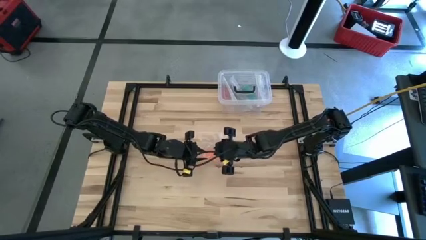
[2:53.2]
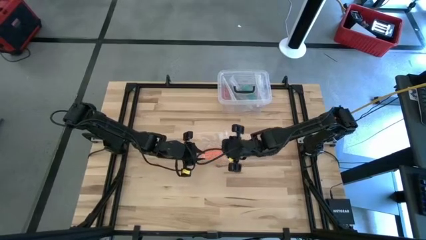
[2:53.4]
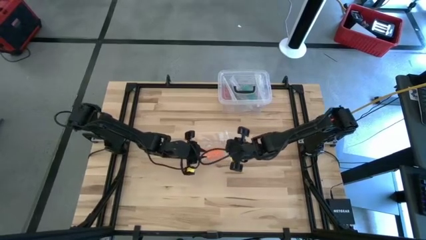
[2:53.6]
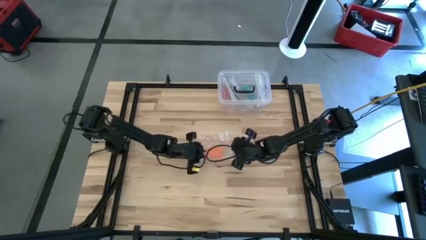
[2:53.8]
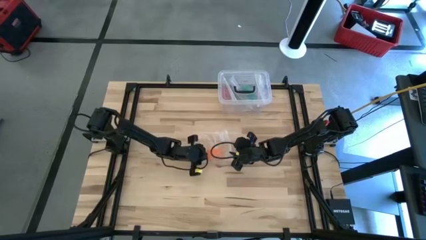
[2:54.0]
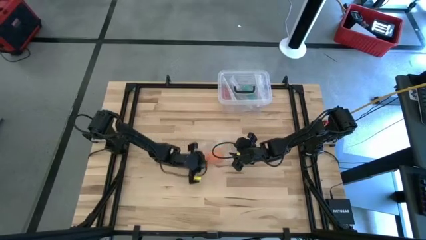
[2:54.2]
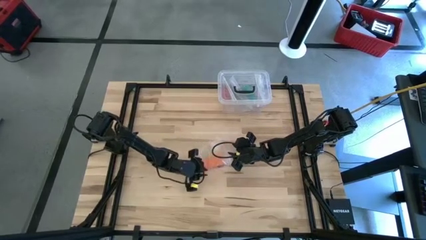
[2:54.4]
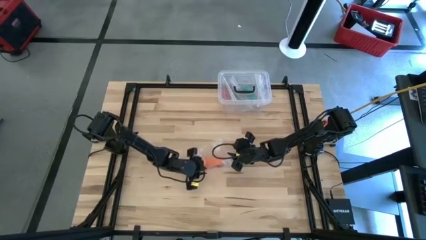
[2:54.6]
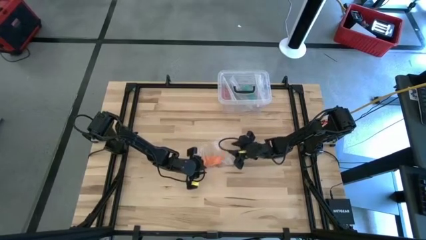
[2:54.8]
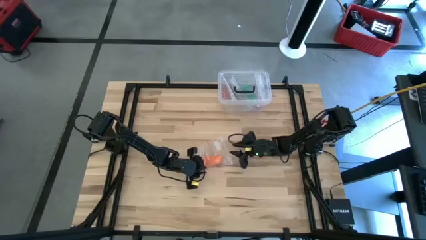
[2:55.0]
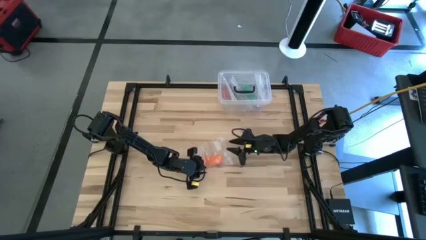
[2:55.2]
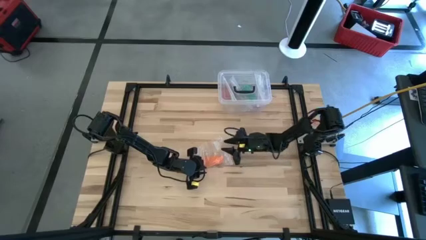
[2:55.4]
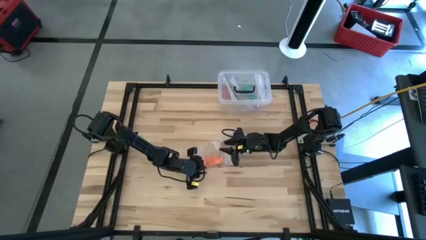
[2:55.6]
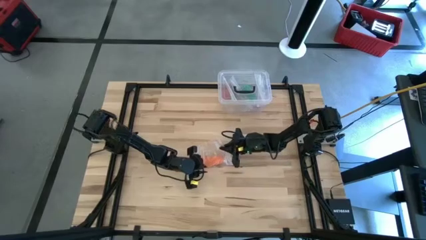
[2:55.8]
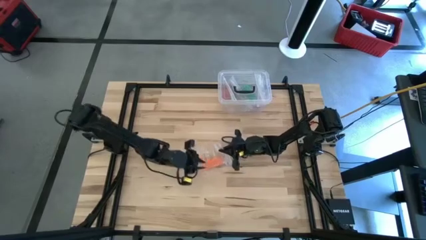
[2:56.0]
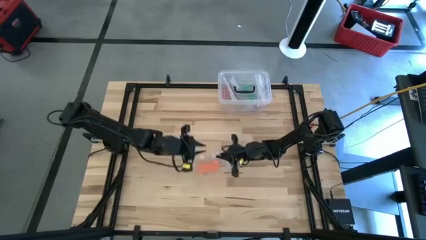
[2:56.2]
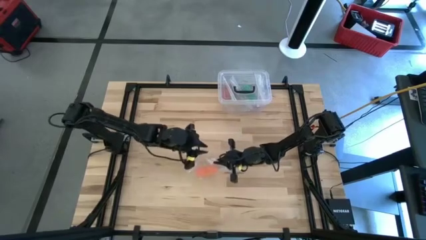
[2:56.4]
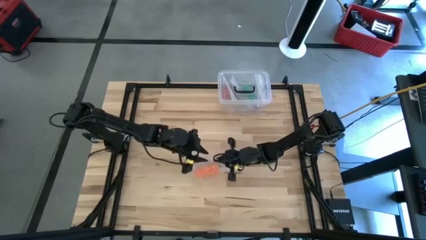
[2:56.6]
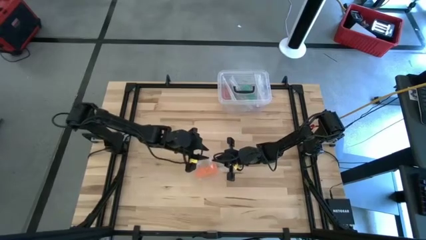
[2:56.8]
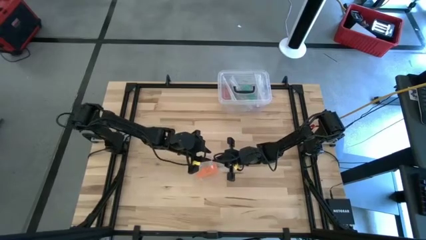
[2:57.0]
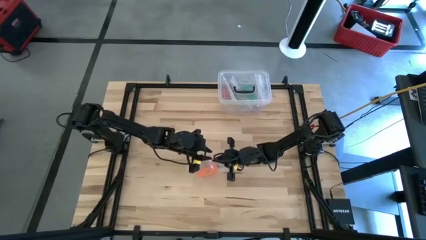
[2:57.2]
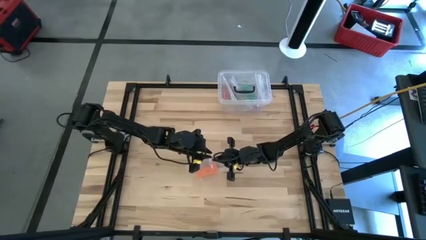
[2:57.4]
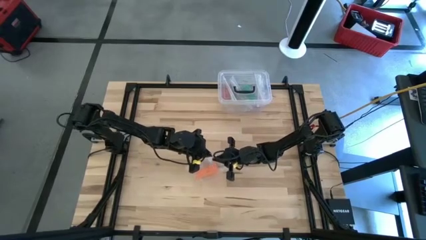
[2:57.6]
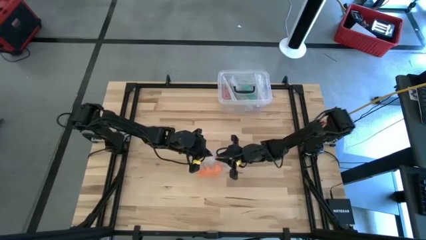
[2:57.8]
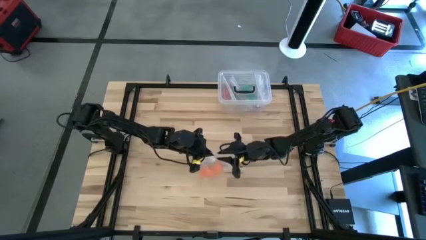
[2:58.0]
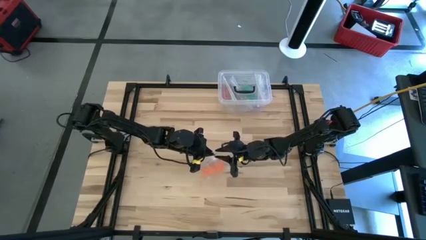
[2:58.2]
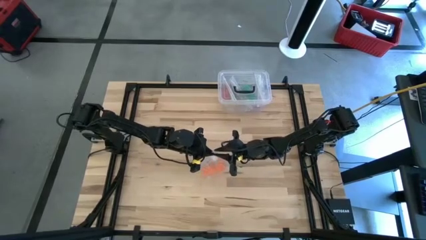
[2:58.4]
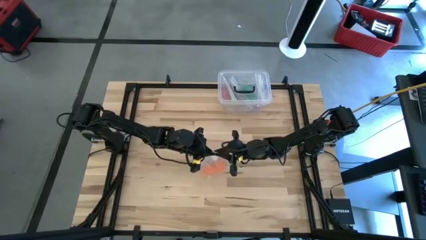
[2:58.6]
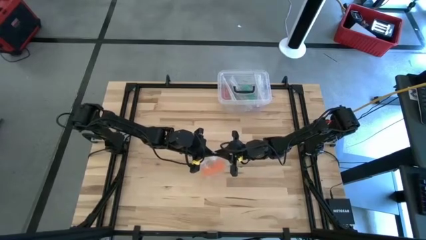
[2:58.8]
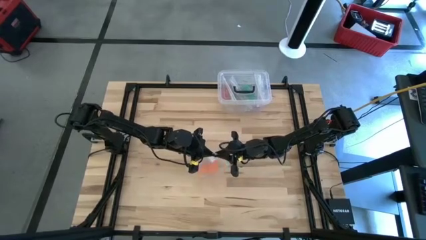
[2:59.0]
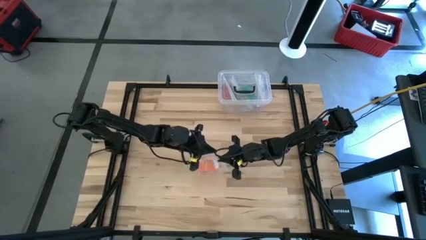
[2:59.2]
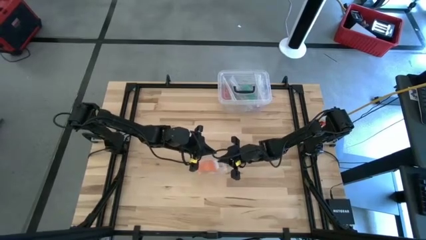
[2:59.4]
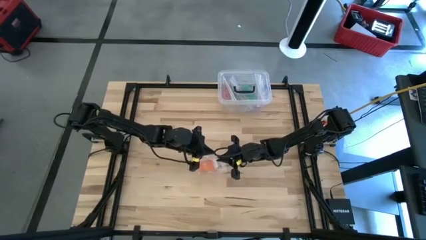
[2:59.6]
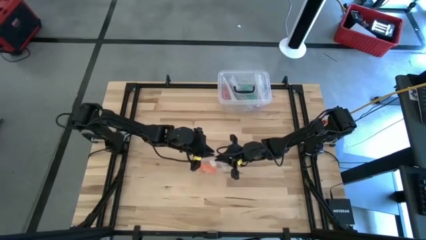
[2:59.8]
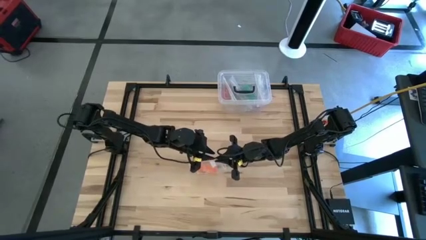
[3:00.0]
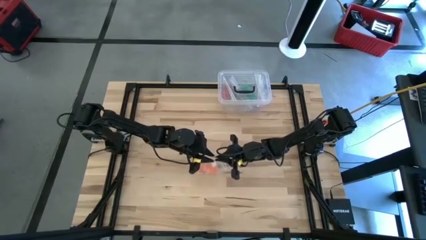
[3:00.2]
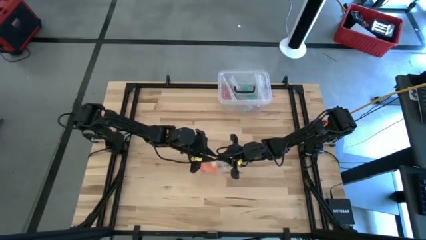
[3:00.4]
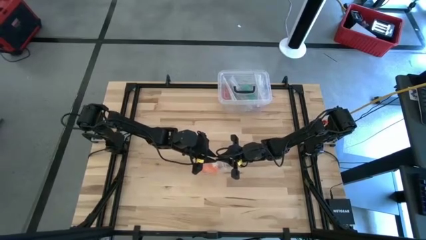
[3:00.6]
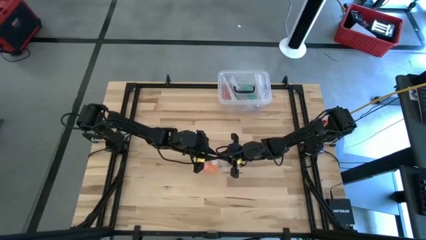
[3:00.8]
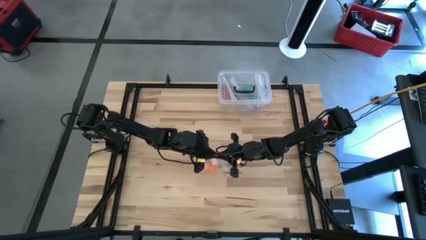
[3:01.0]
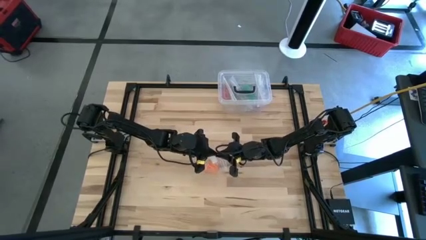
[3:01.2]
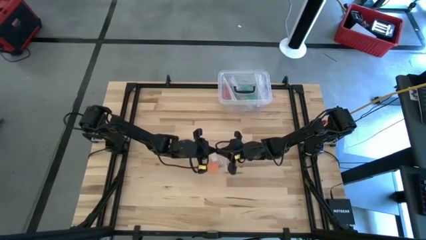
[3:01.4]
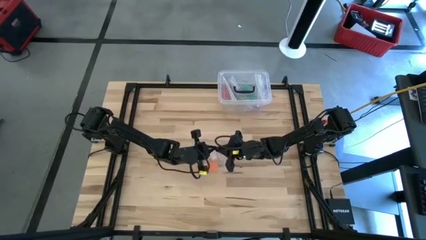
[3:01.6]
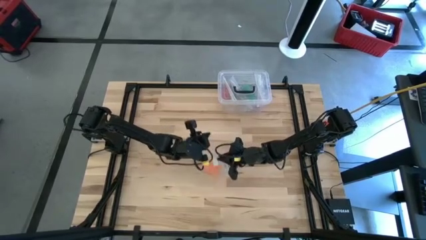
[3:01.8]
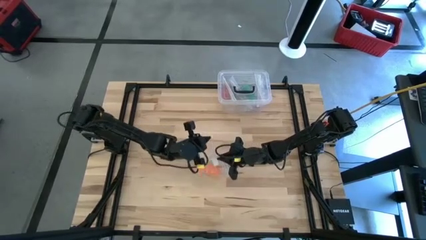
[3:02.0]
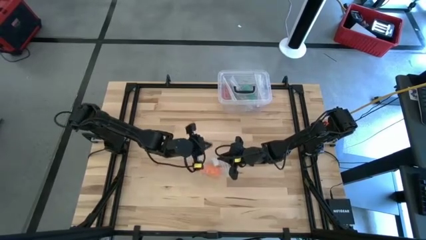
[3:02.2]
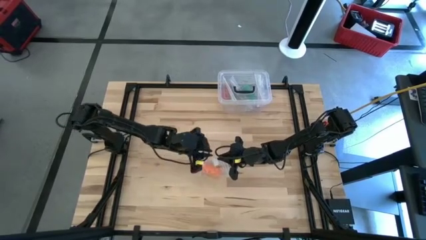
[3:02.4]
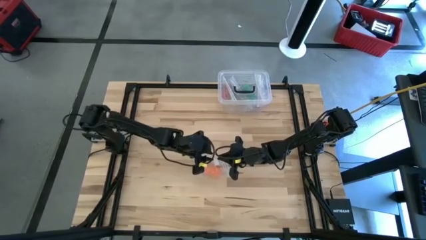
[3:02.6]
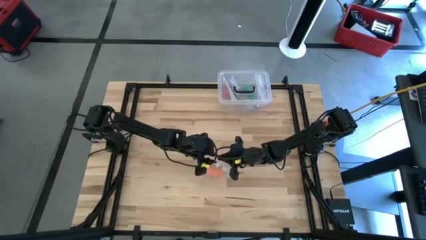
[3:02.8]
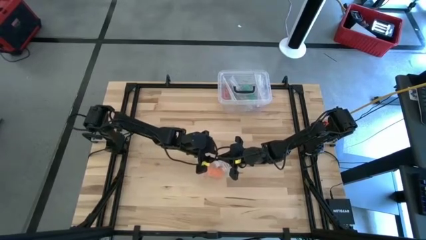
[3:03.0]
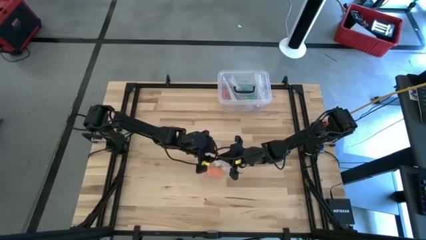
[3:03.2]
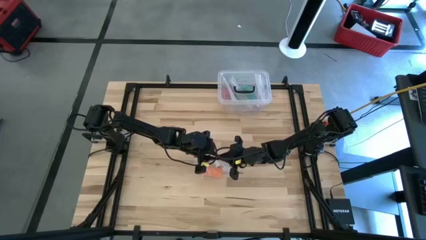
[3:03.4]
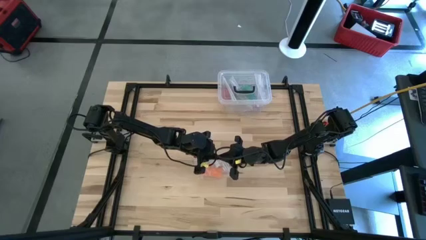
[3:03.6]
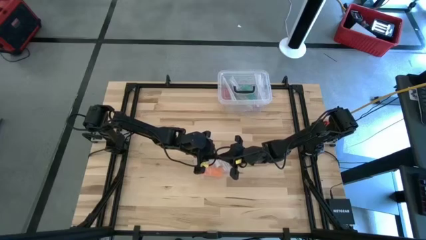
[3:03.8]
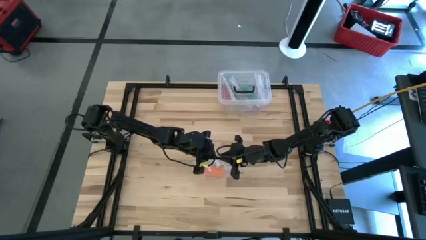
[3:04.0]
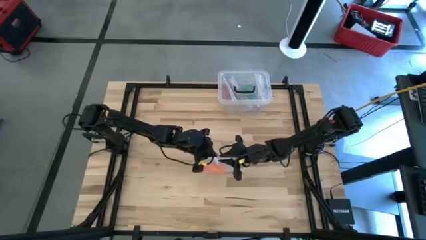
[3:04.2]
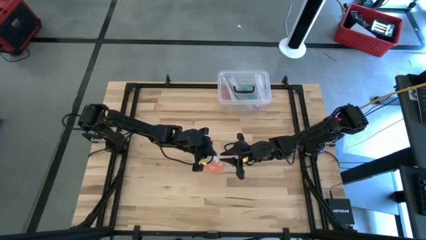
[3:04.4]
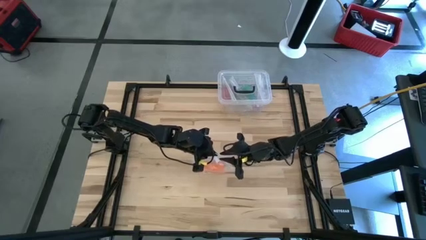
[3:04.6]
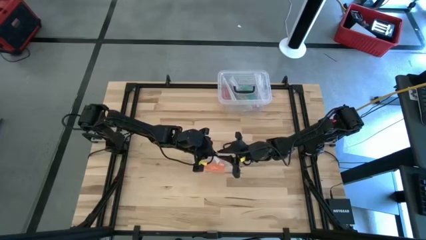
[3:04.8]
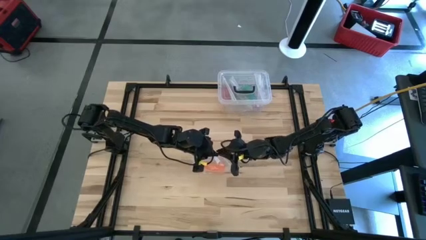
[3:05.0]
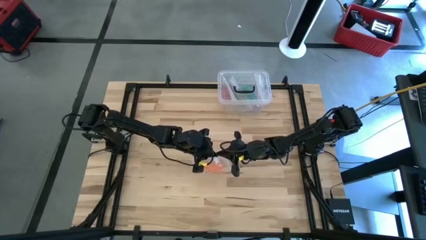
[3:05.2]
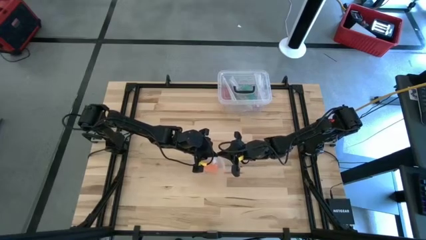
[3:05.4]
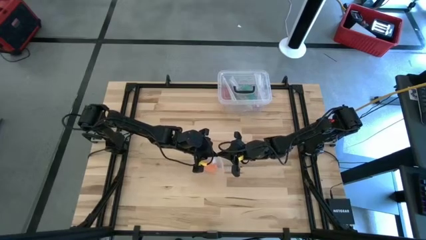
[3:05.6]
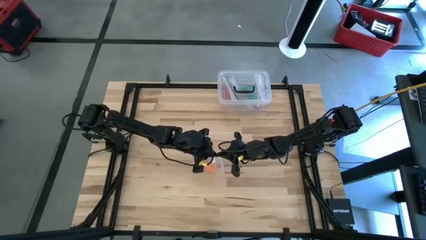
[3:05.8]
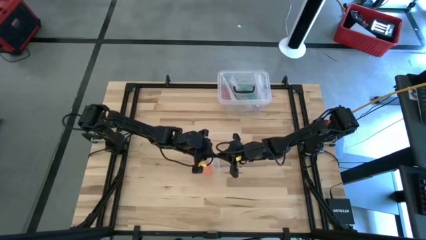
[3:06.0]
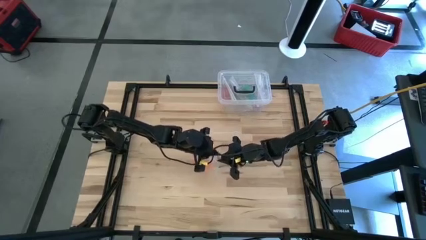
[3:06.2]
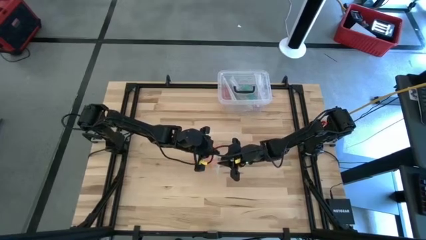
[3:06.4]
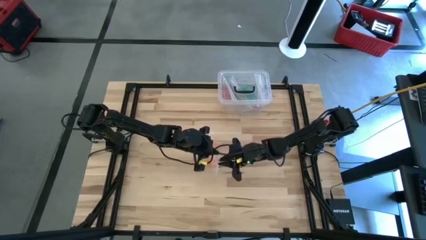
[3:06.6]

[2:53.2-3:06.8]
Task: Roll bandage
Close the zip bag

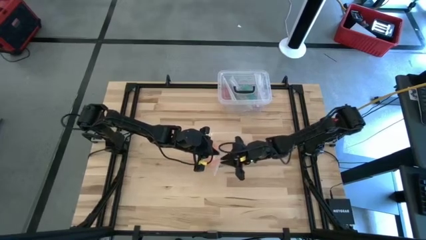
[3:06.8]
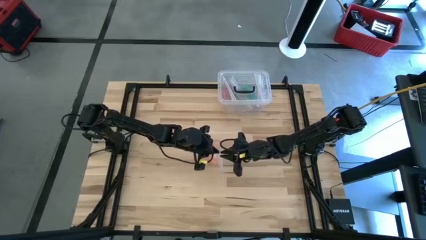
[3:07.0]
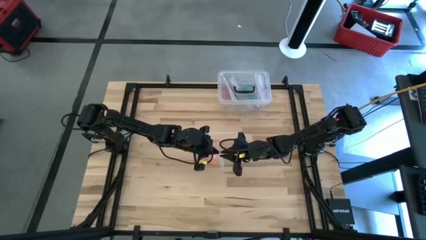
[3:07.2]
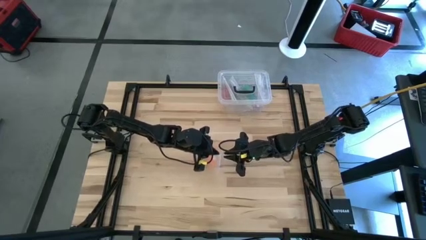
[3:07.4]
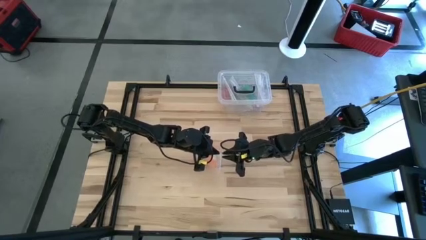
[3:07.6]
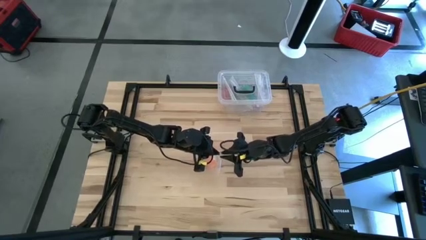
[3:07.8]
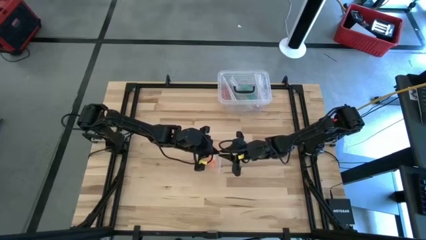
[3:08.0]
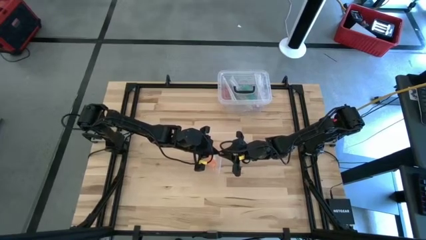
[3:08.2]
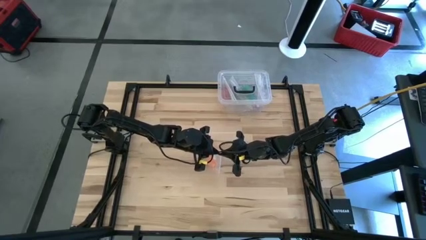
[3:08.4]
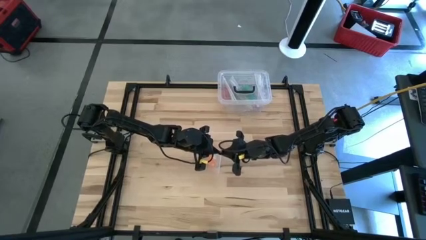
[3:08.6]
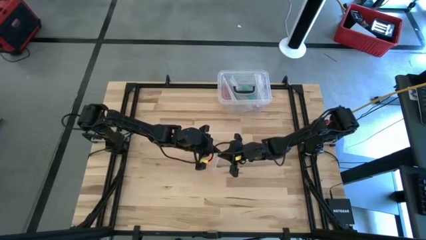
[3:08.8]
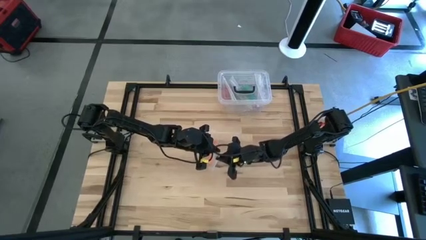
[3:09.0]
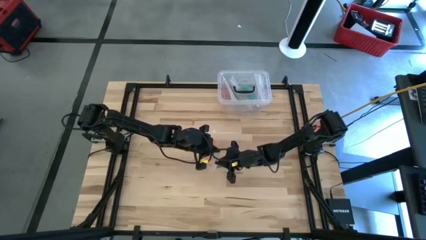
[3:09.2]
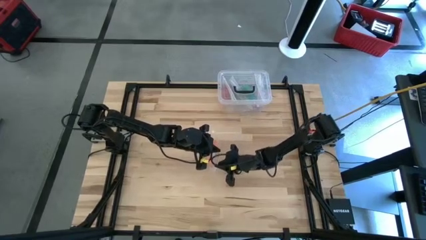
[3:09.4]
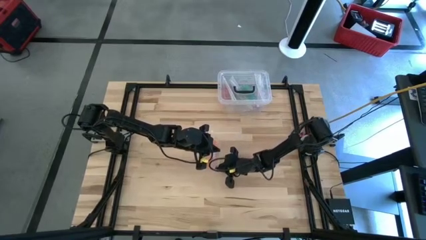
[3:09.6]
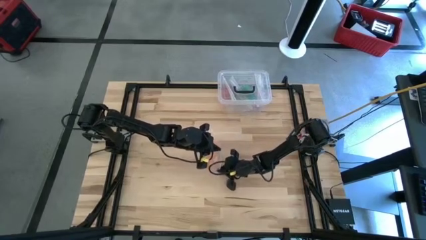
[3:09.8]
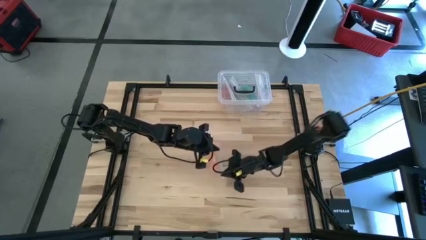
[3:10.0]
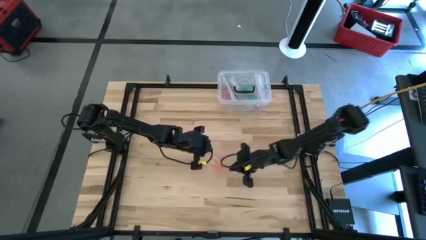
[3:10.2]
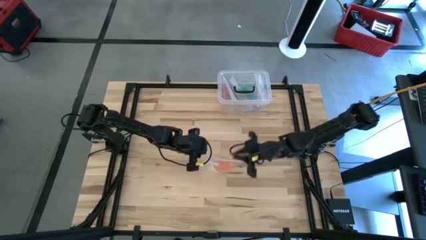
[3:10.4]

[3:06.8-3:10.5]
Close the zip bag
